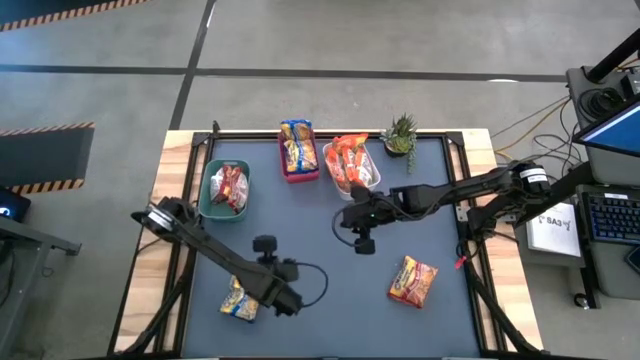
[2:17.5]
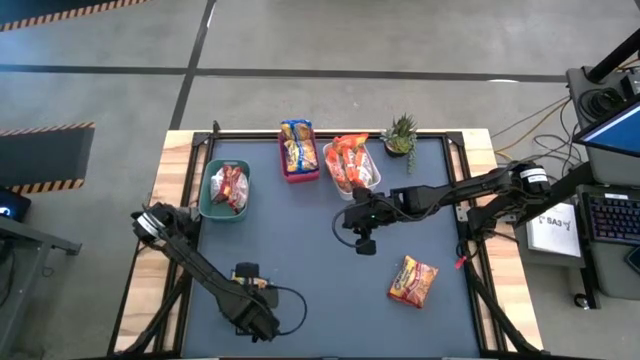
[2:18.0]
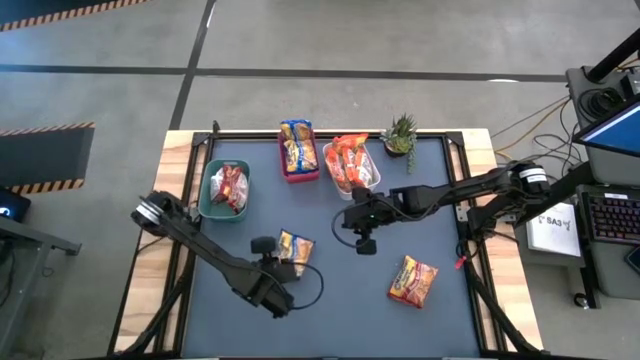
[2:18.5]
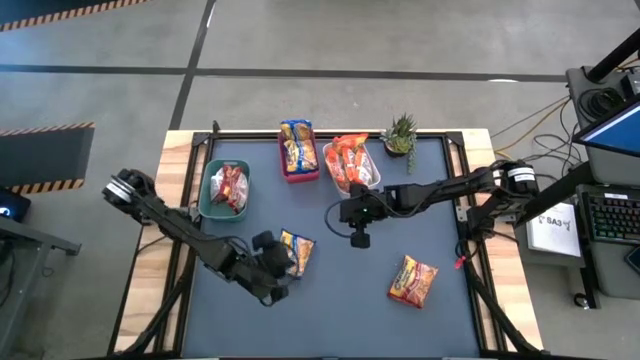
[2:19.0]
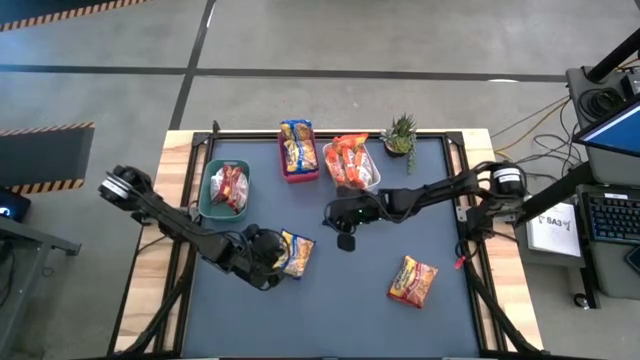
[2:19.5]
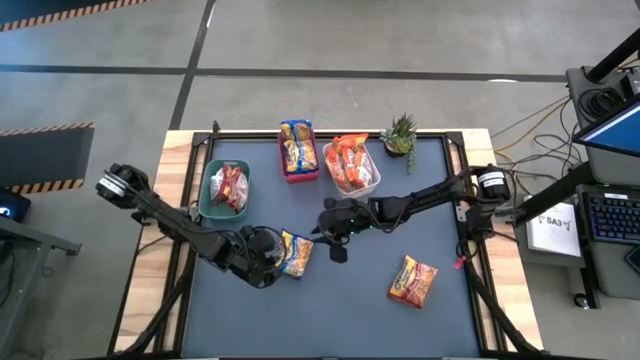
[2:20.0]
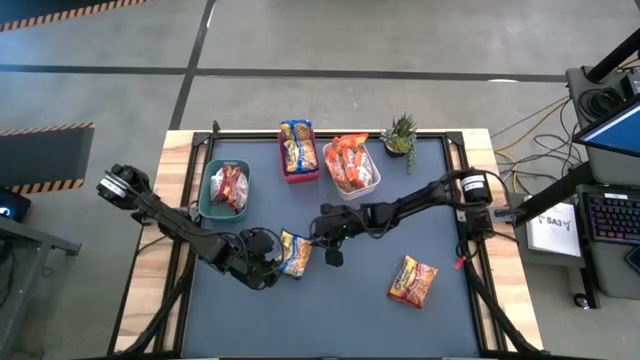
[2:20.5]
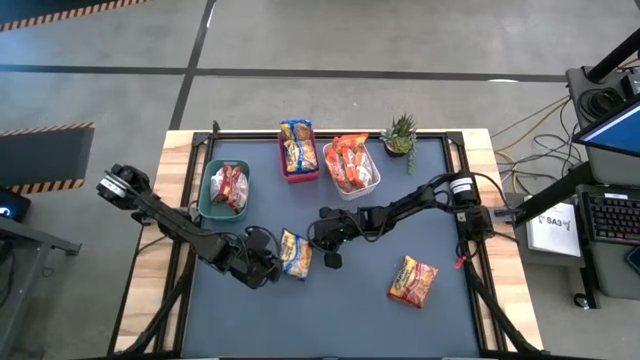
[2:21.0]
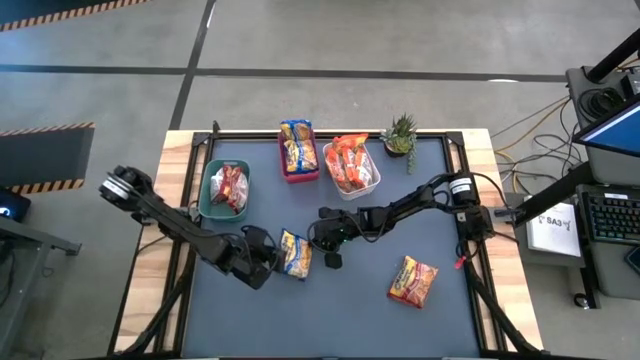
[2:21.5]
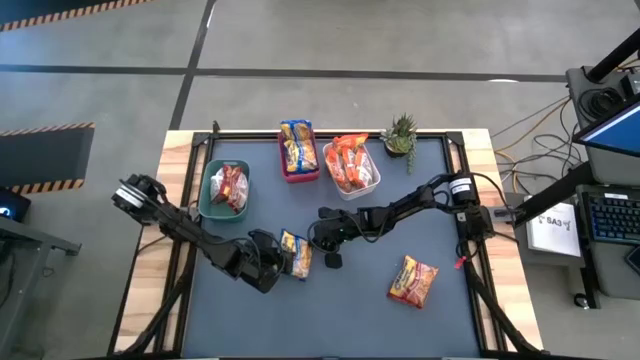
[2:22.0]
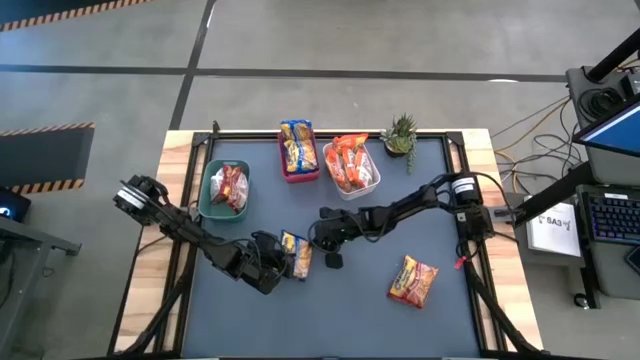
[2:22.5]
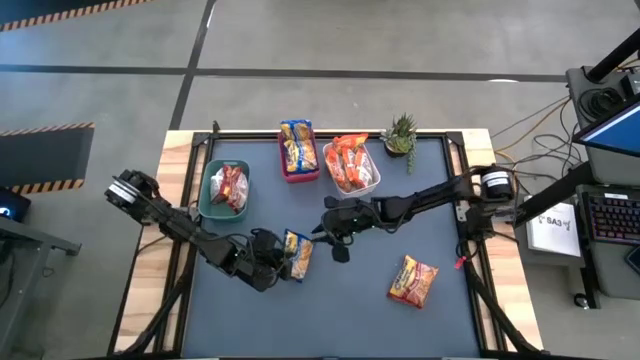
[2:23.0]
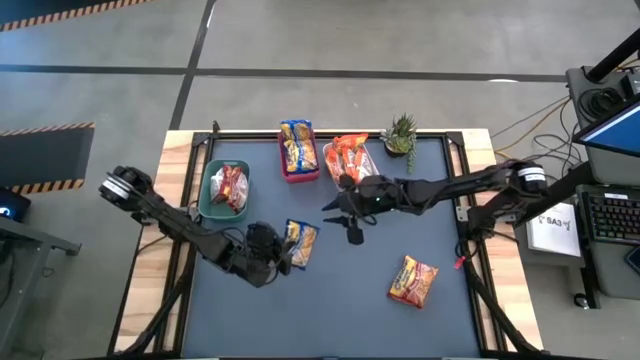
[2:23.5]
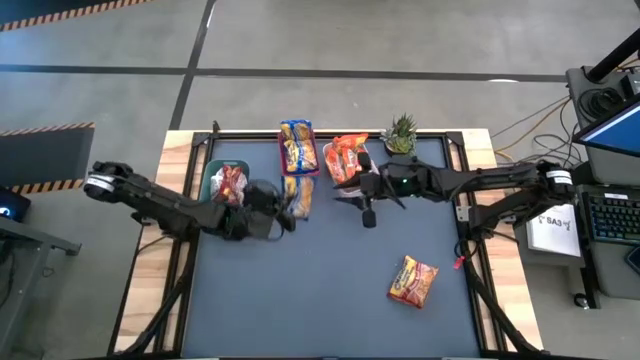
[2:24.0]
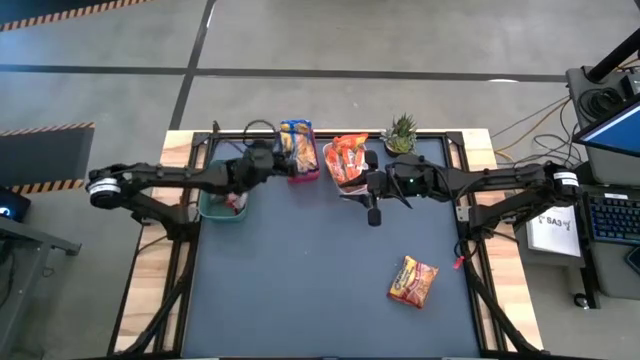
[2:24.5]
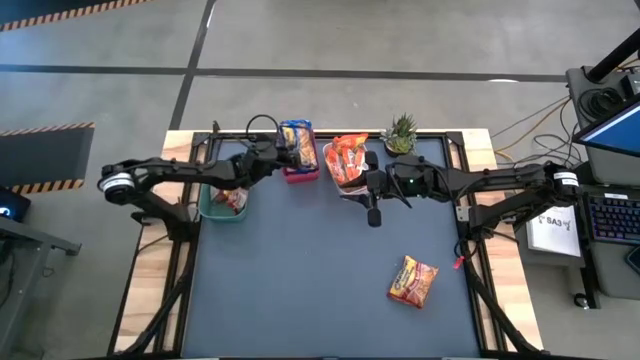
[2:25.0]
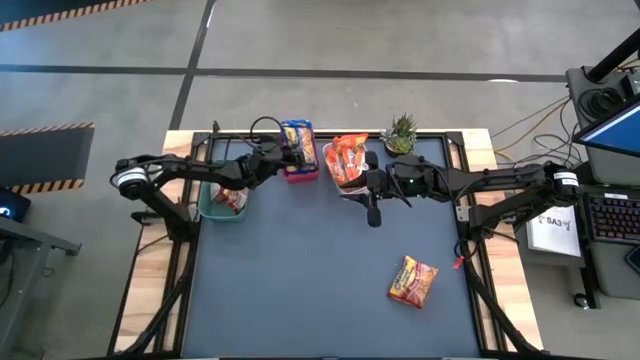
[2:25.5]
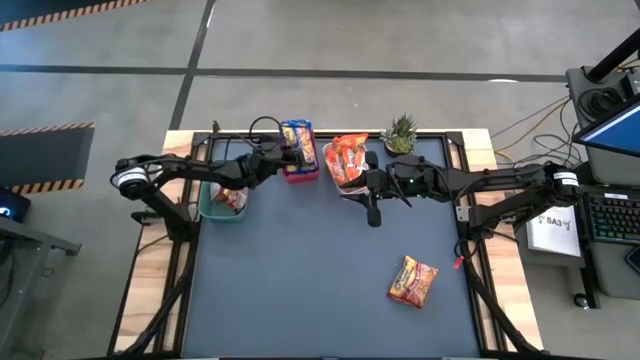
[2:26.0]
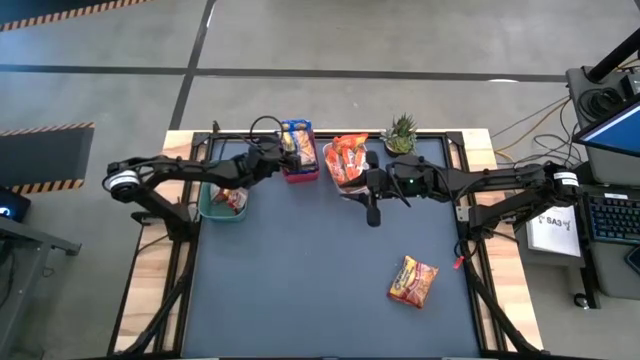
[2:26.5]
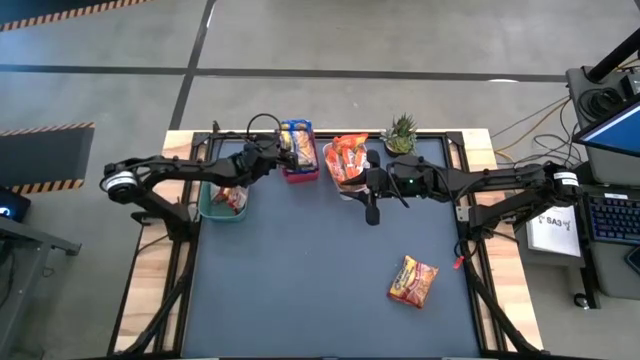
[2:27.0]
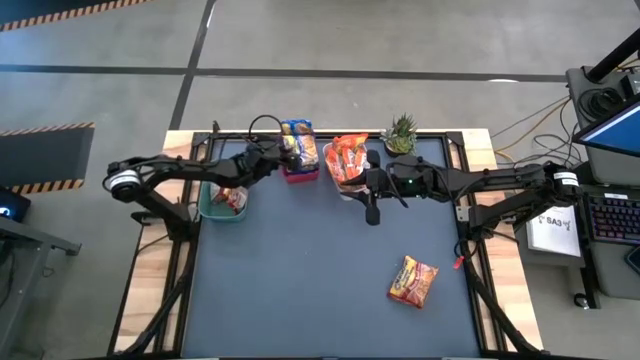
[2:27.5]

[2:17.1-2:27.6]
Task: Sort Maruchan noodles
Put the blue noodle pack in the red bin

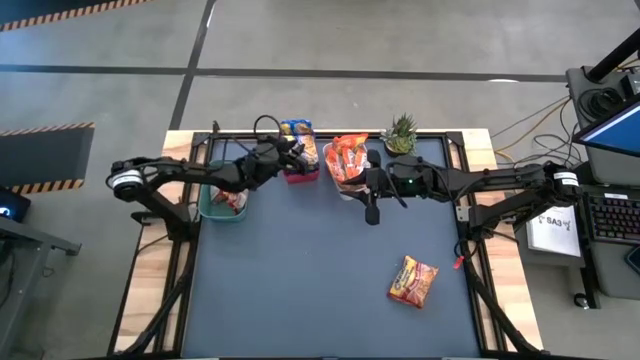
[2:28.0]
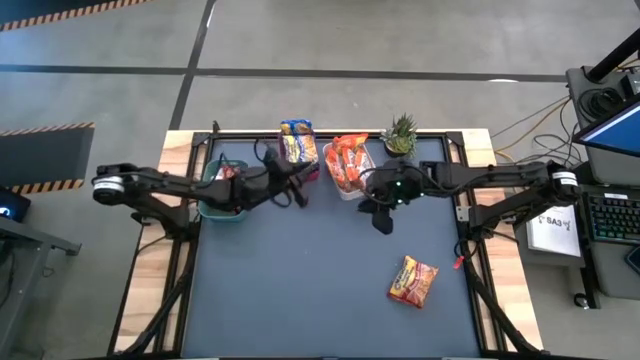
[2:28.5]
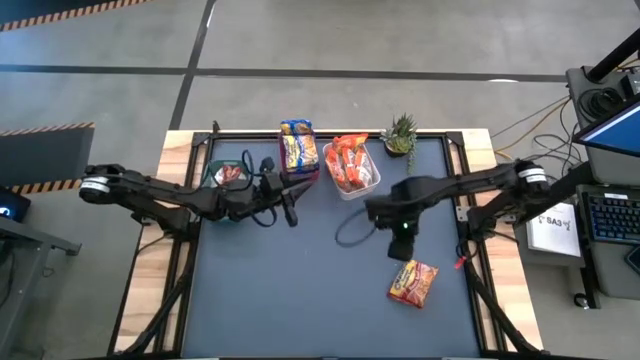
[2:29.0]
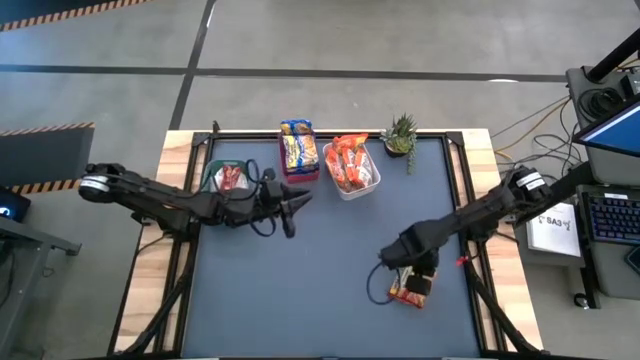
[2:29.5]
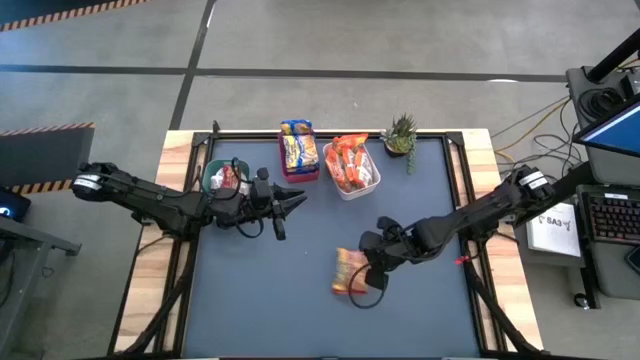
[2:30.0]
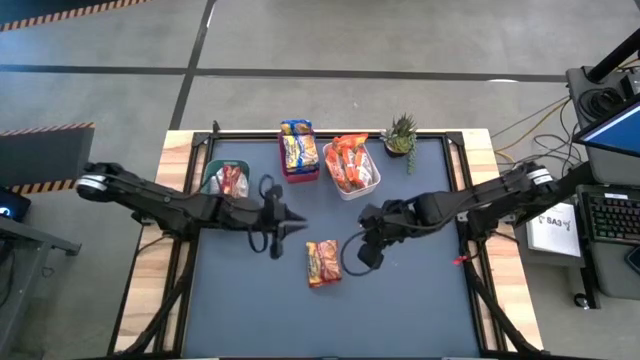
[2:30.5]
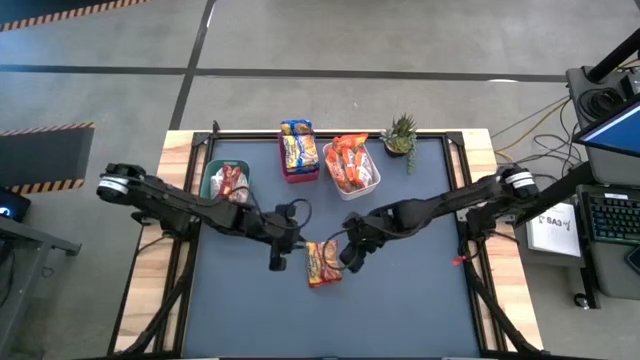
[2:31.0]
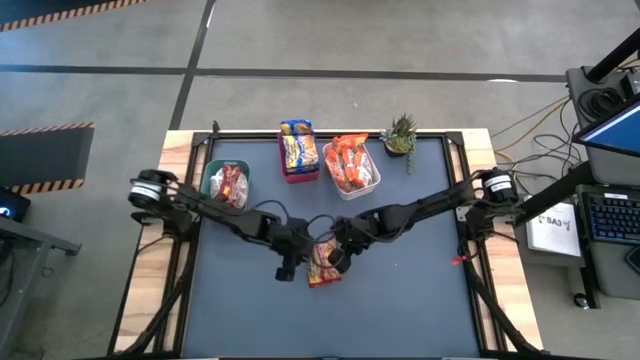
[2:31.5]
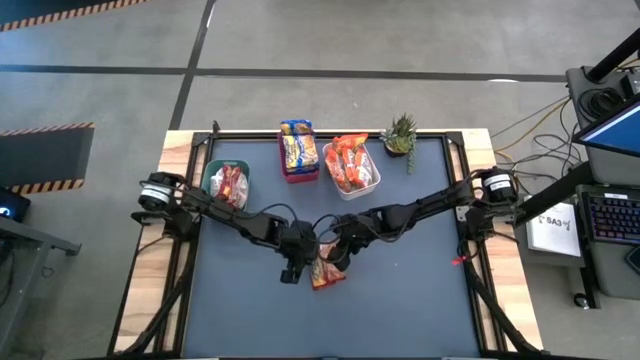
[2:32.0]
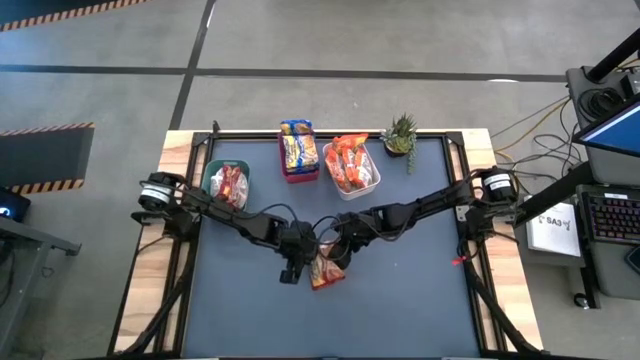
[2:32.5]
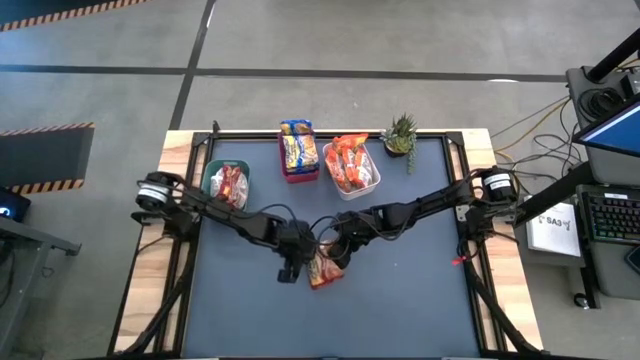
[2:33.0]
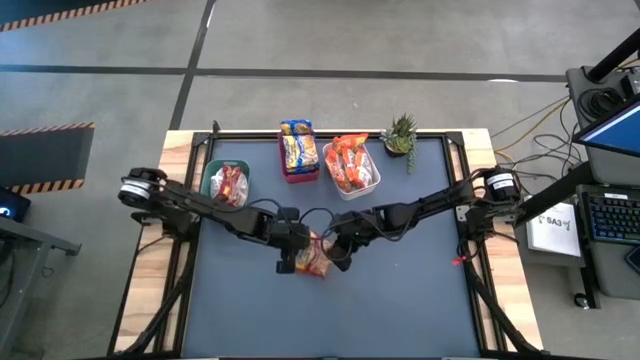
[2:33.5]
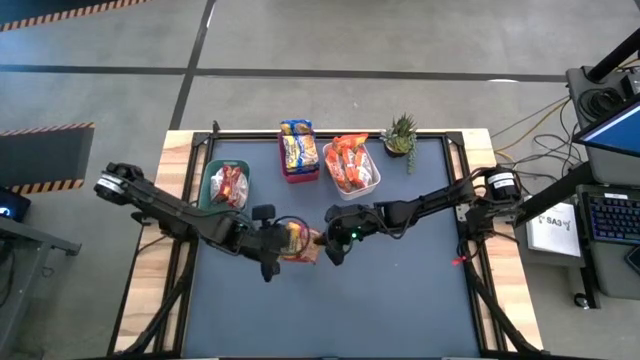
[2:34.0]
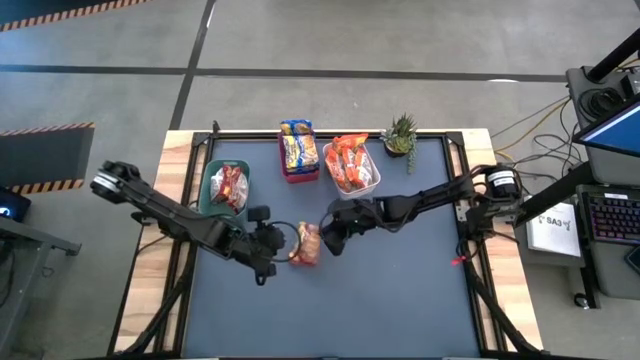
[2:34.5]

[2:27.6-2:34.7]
Put the red noodle pack into the green bin

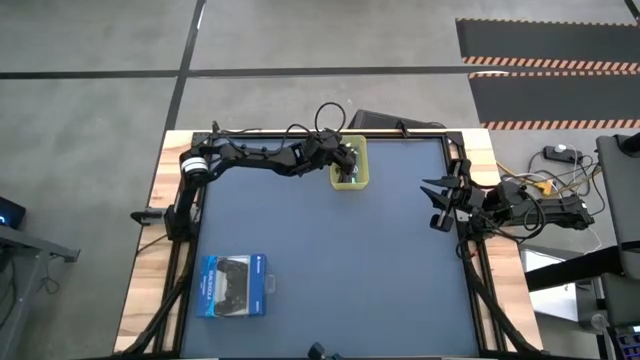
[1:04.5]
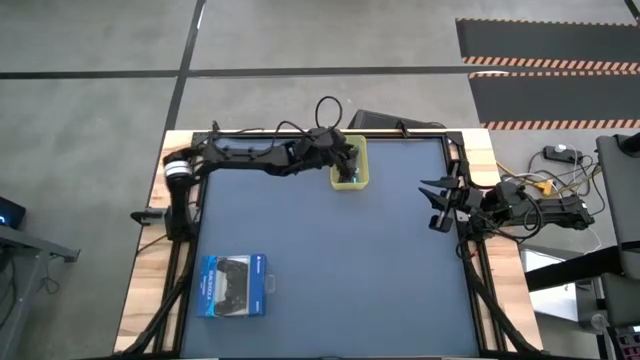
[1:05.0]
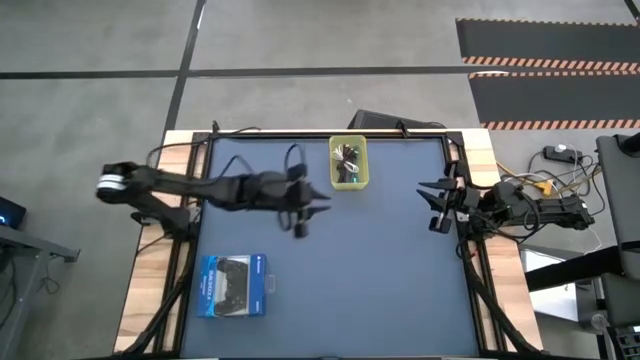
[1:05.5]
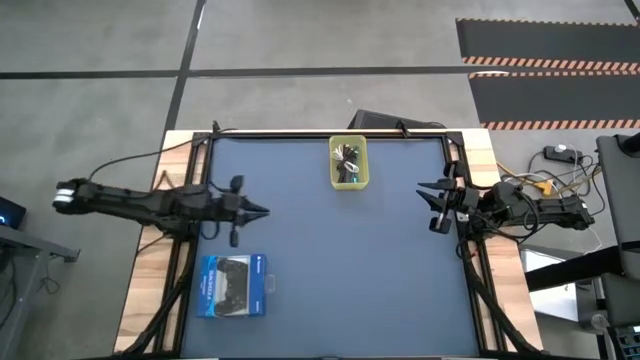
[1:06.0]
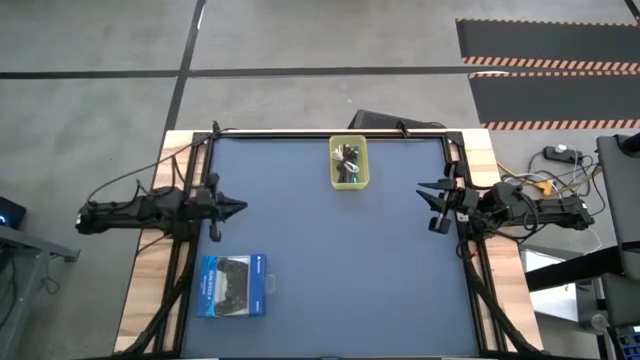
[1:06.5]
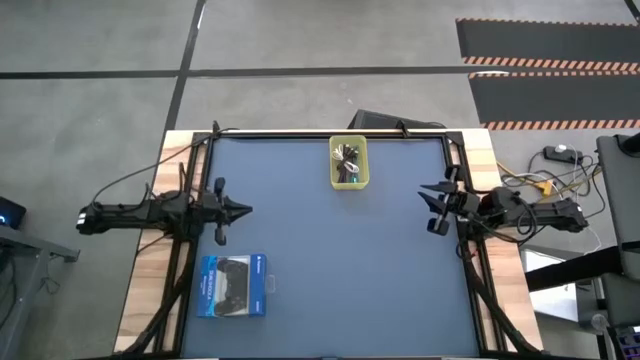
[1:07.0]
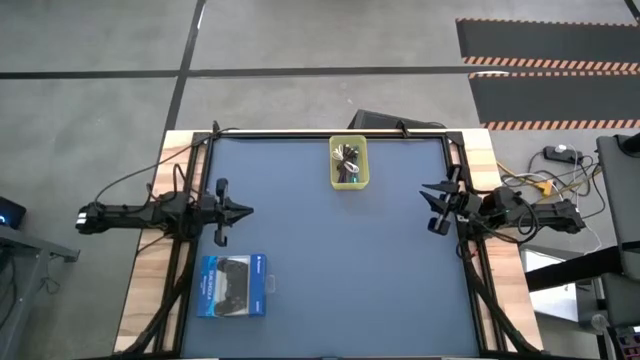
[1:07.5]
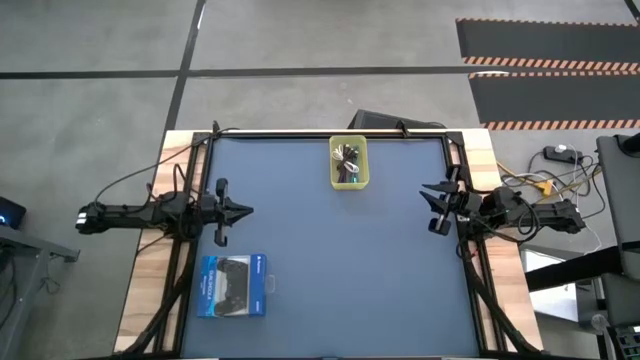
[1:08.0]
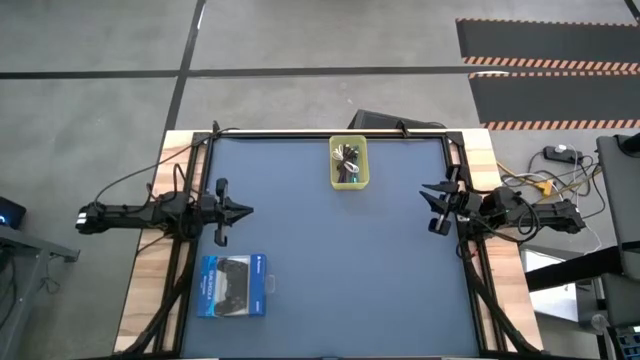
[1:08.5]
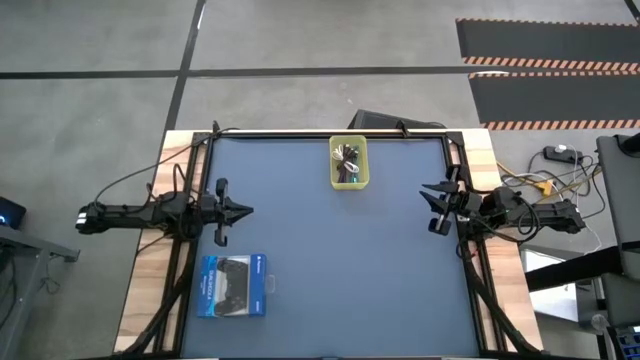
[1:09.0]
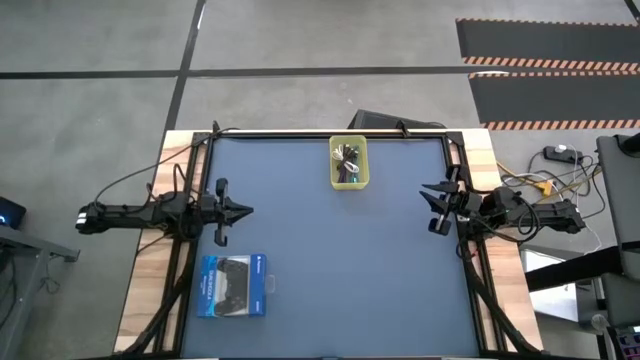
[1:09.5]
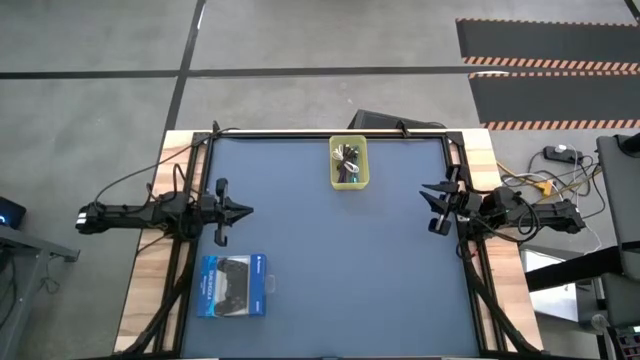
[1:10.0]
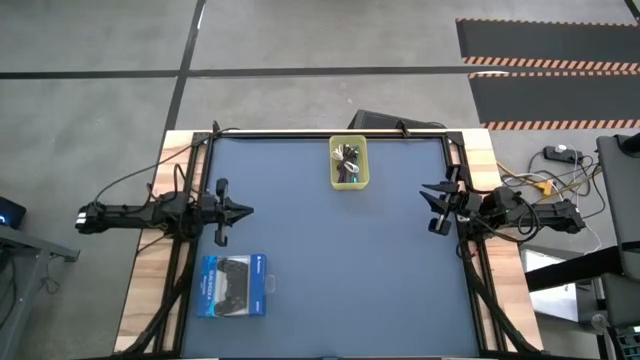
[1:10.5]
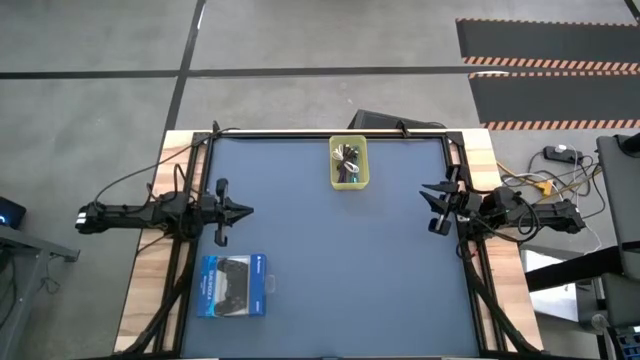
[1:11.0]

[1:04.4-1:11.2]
Task: Pick and place USB-C Cables
Return to Home Position
